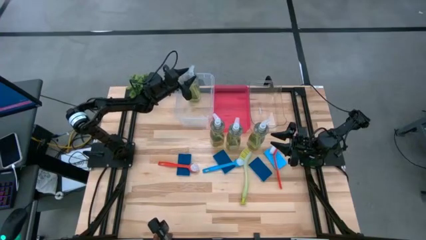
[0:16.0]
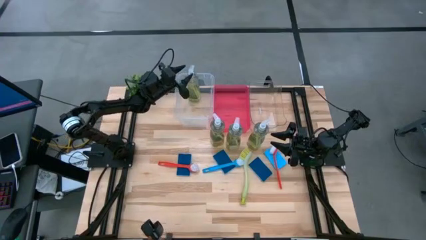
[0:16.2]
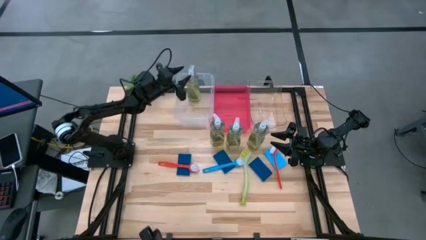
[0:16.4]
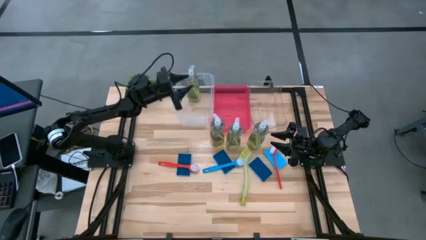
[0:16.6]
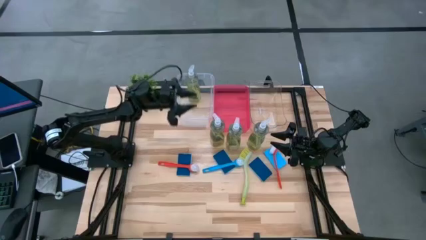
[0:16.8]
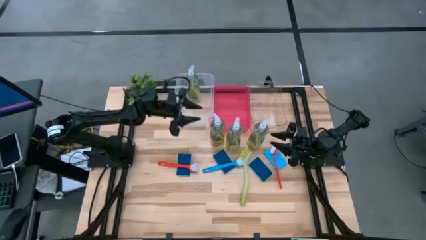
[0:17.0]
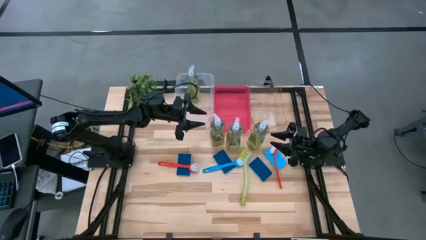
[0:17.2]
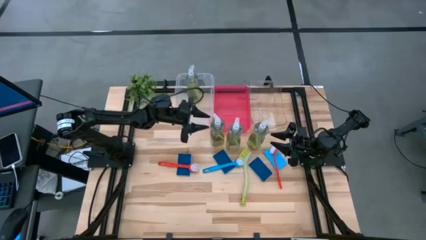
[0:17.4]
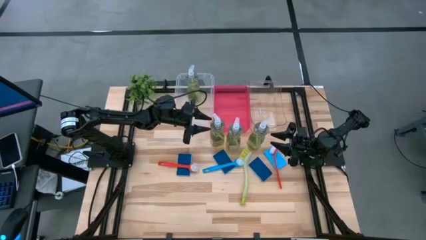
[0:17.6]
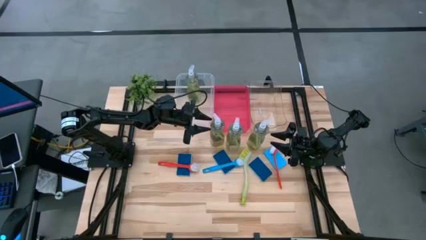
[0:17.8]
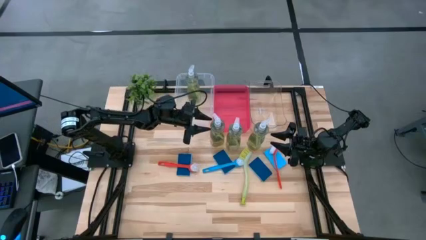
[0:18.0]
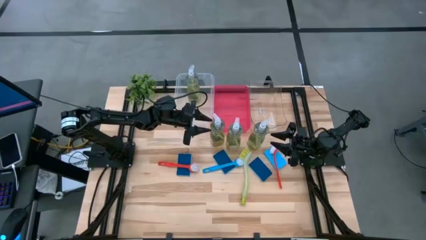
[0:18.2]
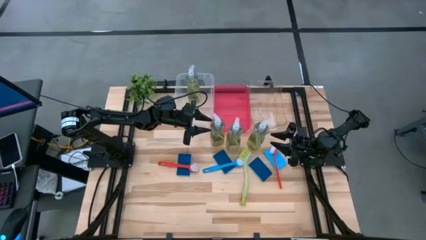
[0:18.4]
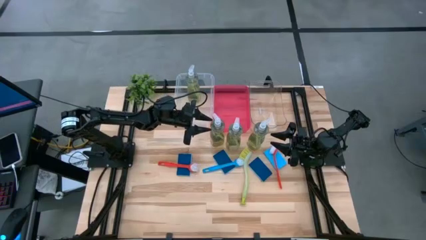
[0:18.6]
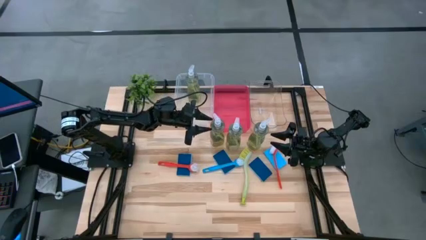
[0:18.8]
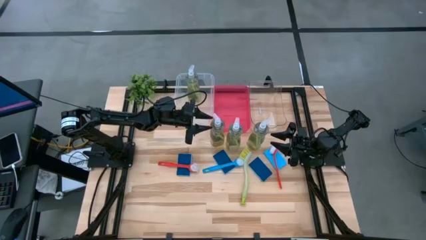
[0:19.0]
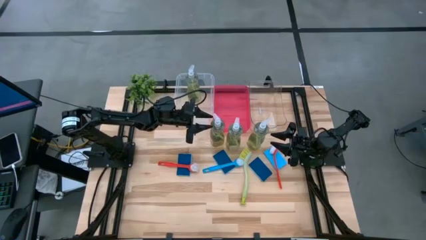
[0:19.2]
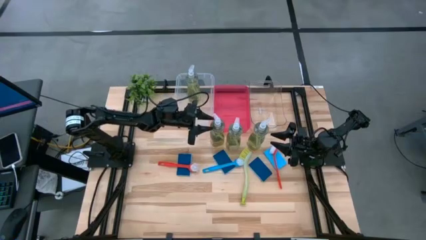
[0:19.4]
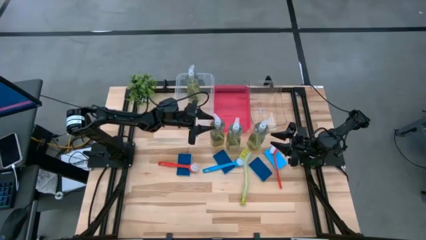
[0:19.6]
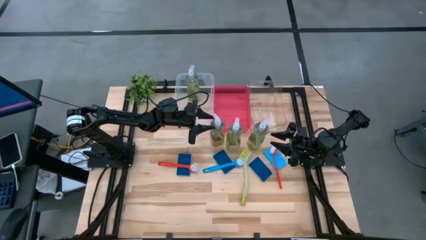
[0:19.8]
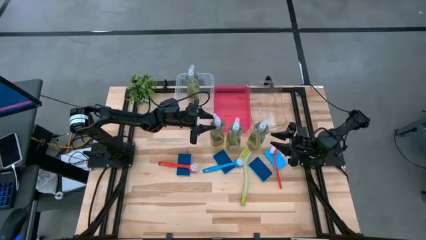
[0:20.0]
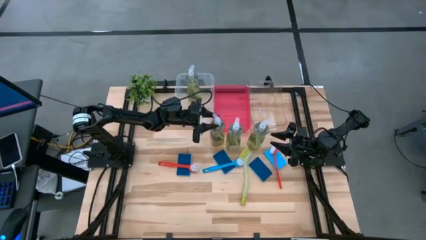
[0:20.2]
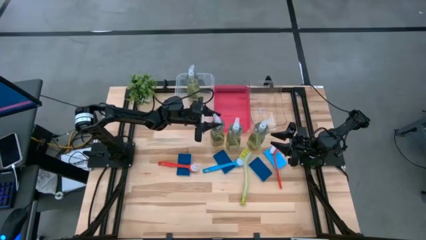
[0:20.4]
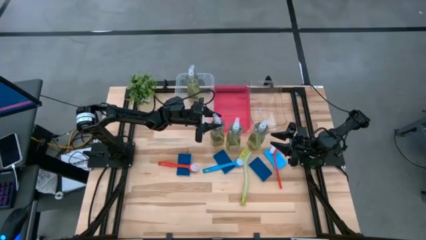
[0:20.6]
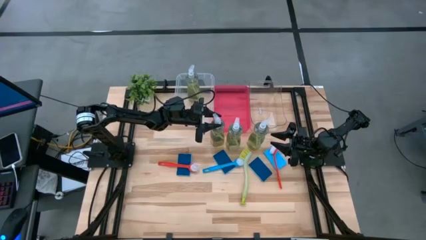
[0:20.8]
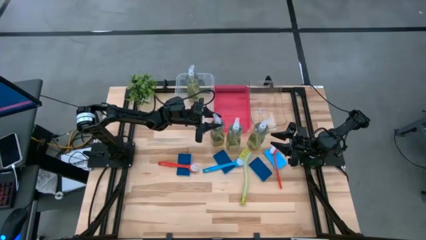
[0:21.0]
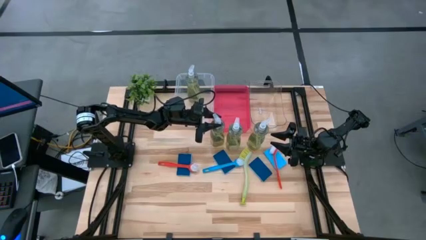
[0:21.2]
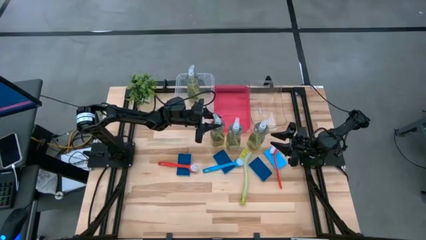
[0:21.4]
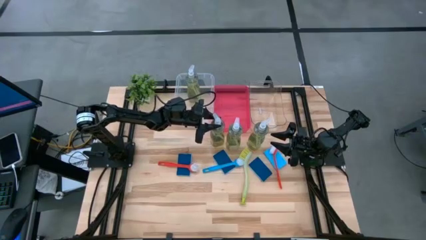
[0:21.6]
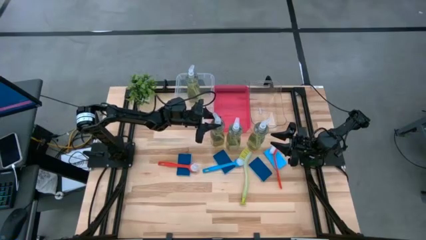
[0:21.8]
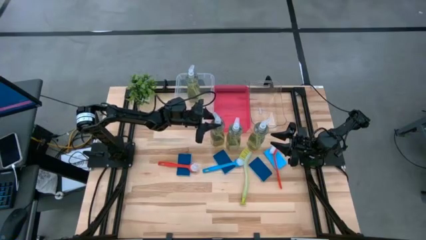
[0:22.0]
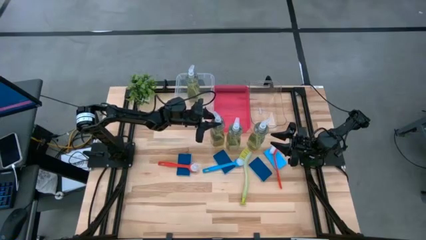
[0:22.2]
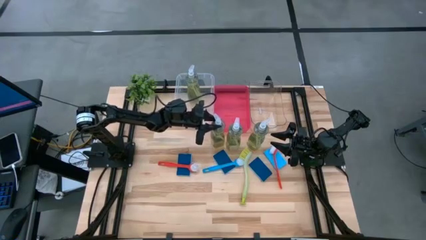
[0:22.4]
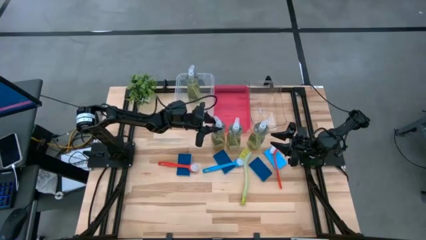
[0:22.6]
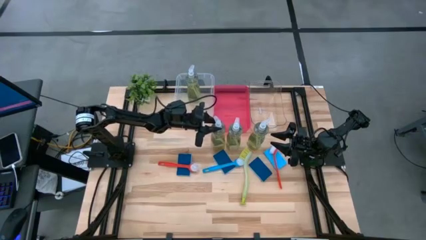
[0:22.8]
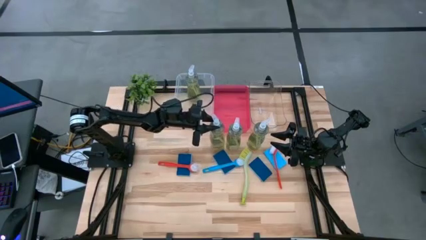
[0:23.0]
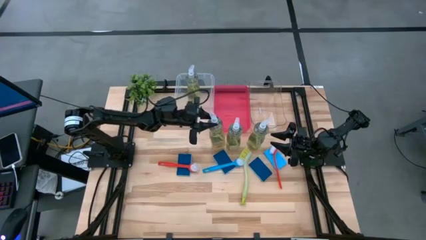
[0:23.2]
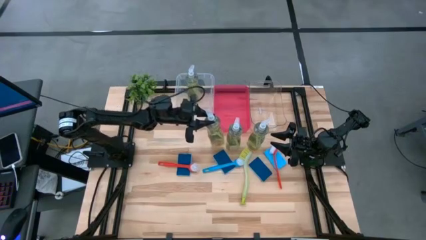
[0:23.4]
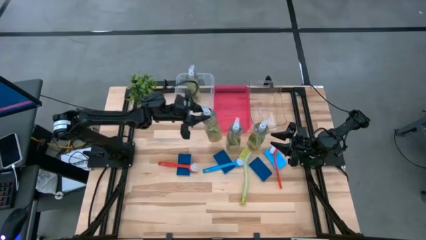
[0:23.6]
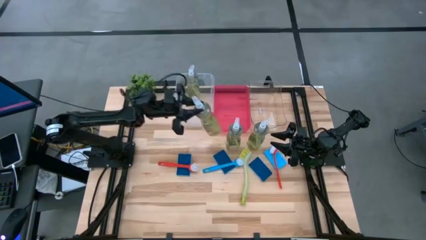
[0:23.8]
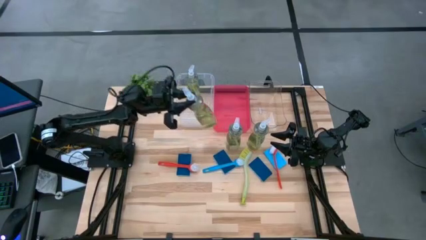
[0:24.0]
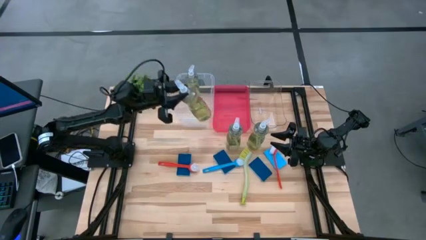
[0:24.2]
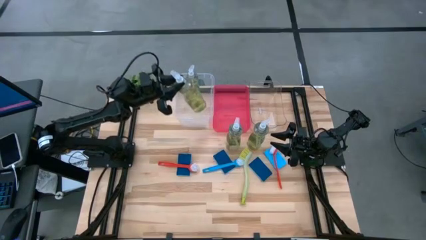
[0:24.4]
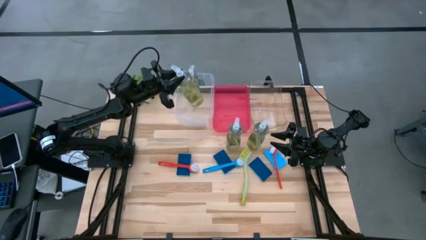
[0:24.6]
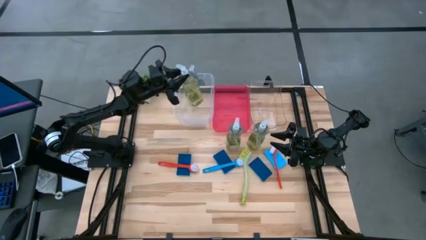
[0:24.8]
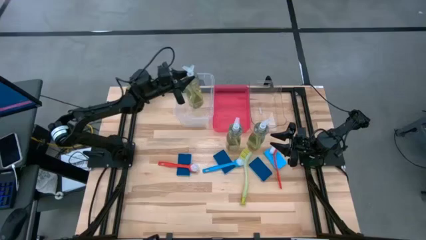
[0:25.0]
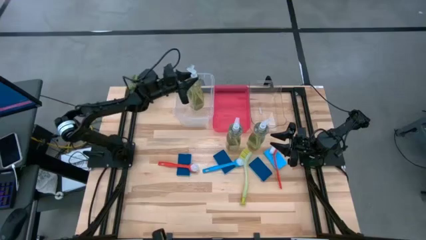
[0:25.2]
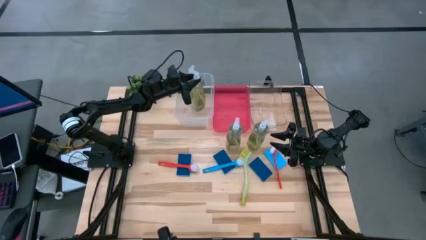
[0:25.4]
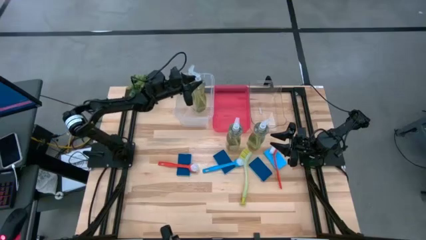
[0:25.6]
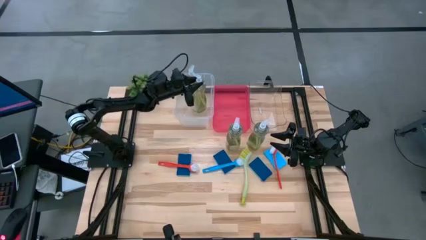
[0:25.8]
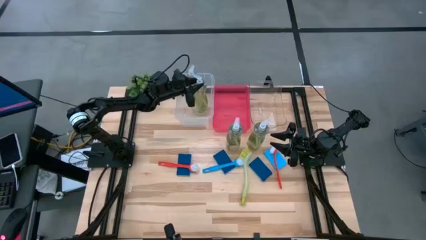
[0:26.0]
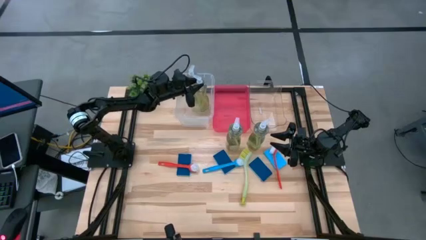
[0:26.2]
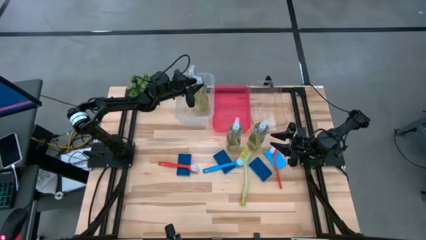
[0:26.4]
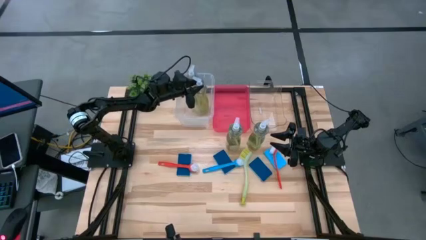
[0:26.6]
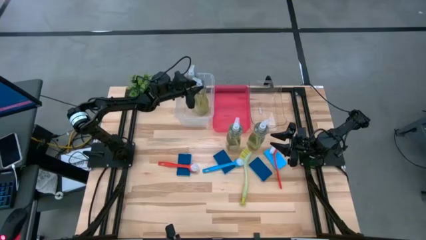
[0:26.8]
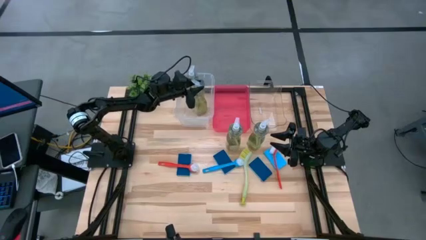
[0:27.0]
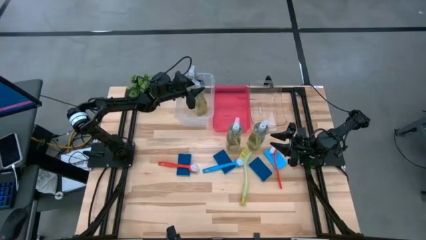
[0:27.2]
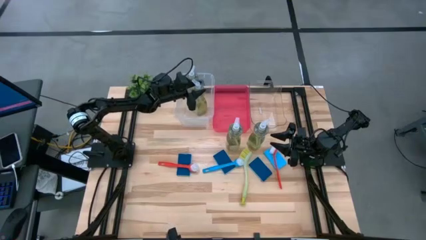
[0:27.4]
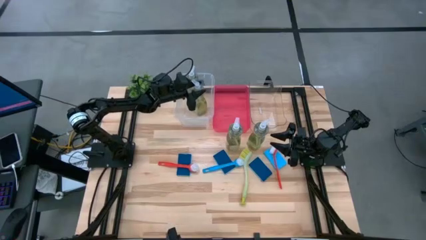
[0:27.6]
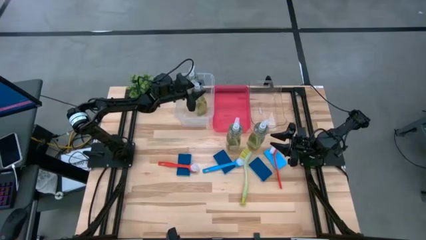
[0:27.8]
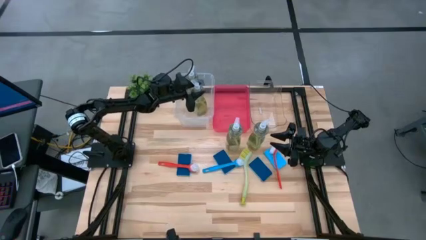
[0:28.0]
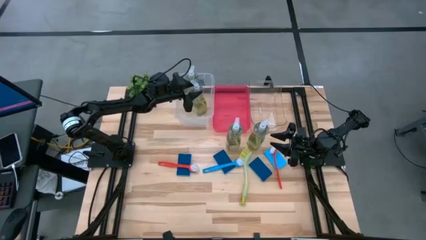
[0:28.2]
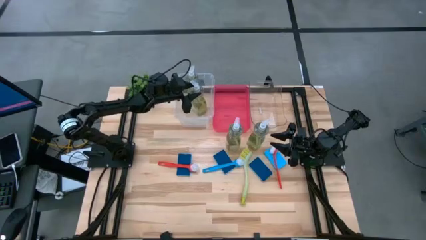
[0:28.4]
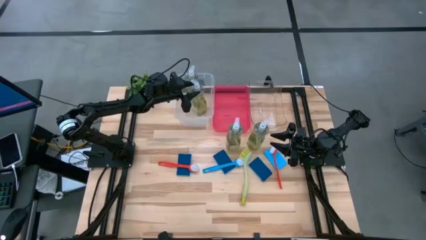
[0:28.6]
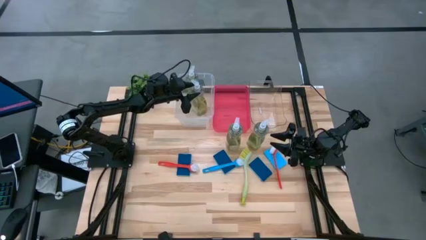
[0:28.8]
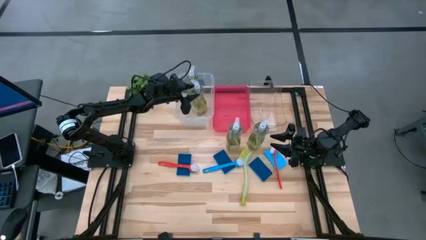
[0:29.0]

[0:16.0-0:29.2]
Task: Pick & Place Kitchen Sink Supplies
Put the yellow dish soap into the transparent container

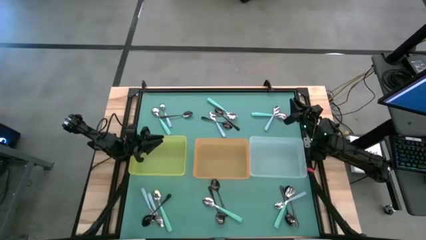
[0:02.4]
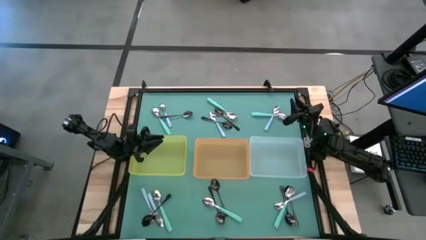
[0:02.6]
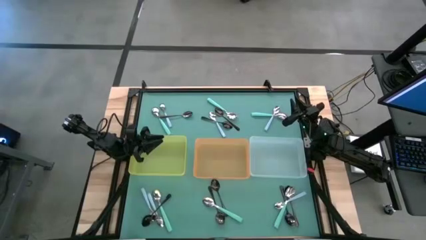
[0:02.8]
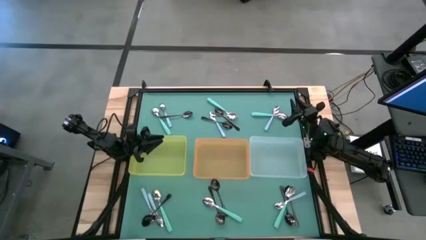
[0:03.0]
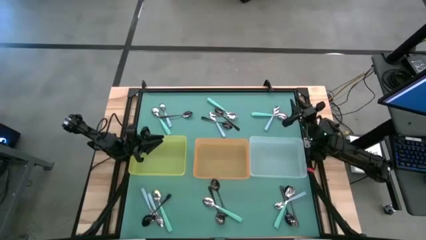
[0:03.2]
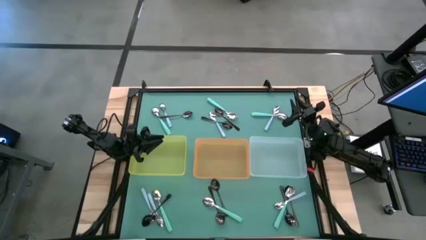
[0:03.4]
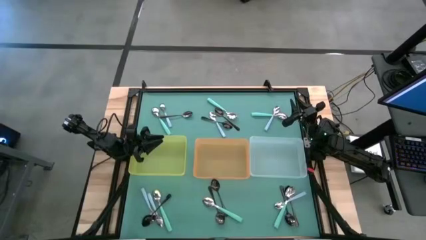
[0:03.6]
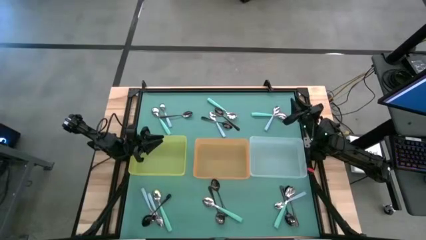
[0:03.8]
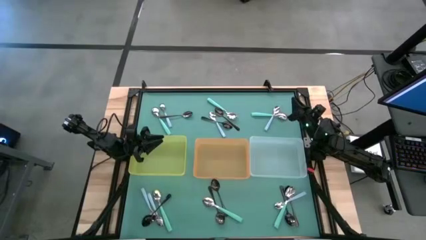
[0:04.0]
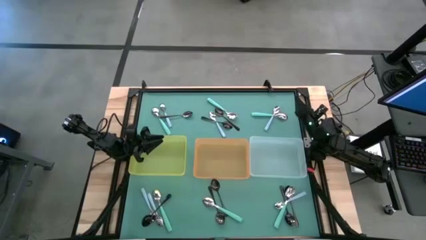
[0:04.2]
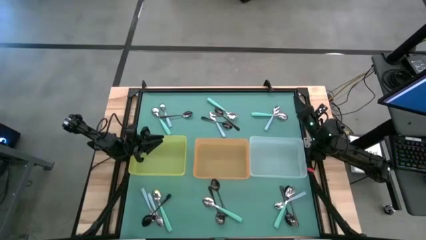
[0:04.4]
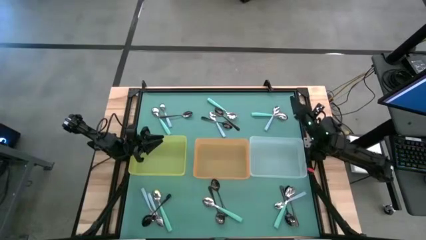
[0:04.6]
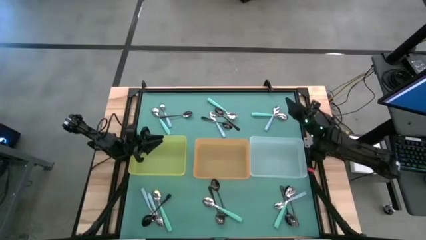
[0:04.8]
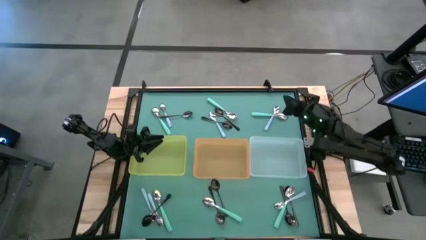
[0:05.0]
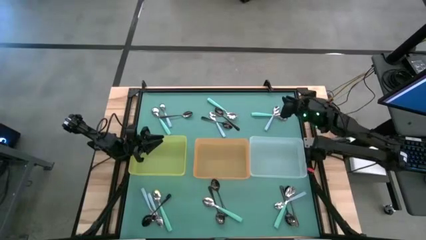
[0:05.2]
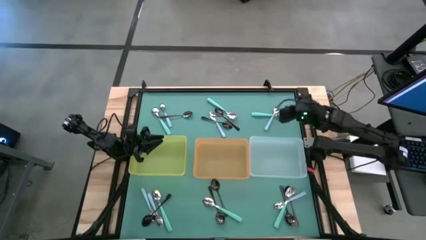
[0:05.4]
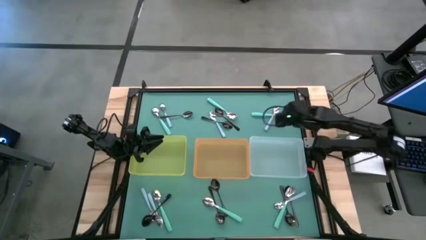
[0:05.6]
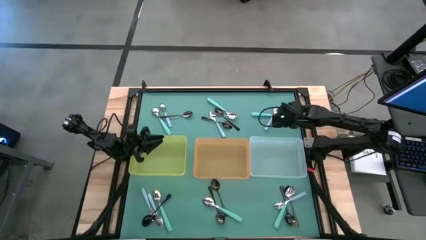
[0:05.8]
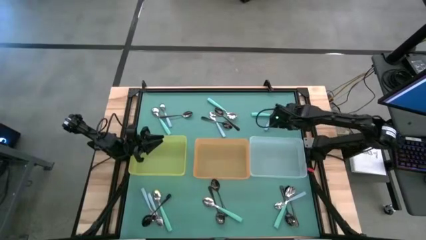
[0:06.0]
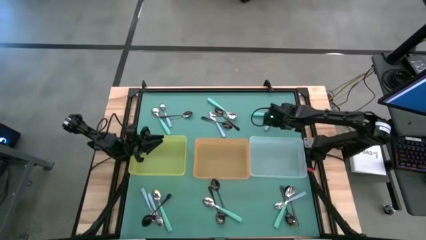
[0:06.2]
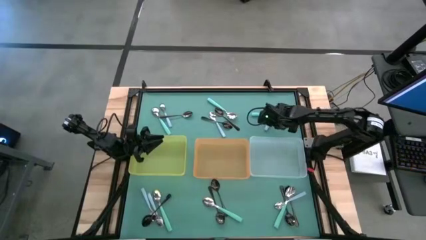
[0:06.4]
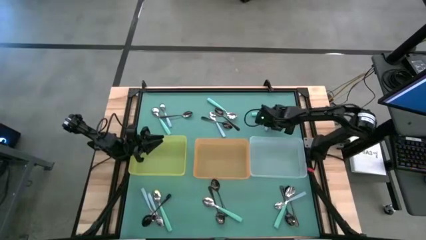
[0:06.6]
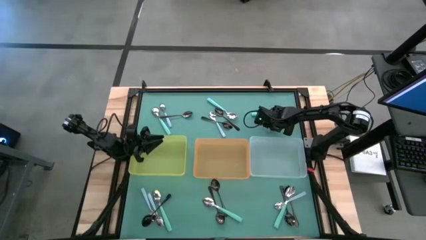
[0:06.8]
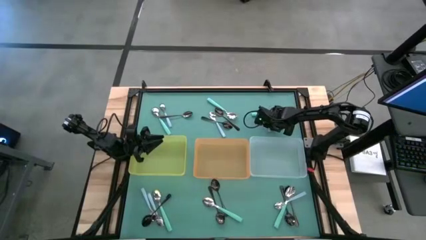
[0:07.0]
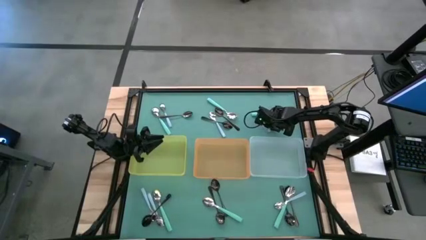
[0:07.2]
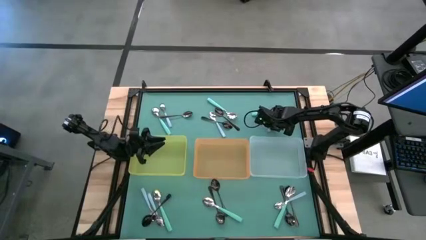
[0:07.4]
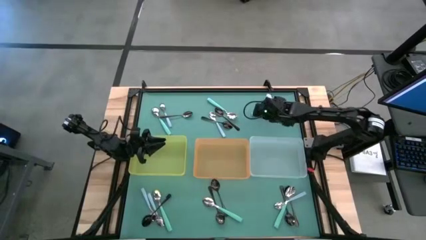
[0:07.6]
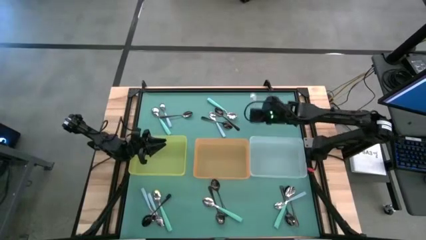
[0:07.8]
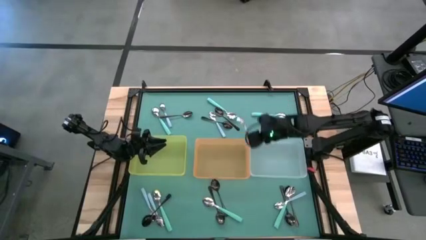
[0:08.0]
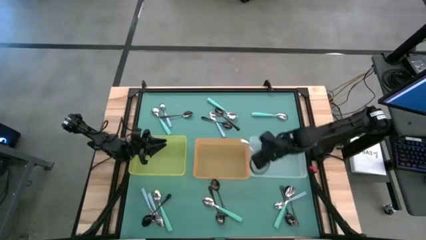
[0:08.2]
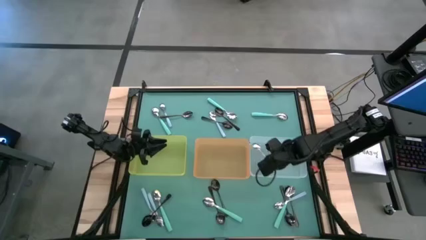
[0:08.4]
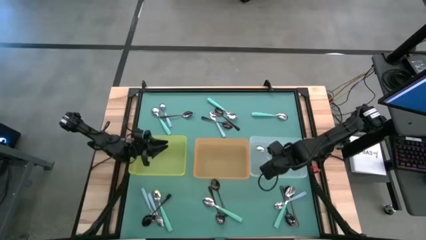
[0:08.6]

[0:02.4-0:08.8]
Task: Sort silverware by color (type)
Put the blue spoon into the white bin
